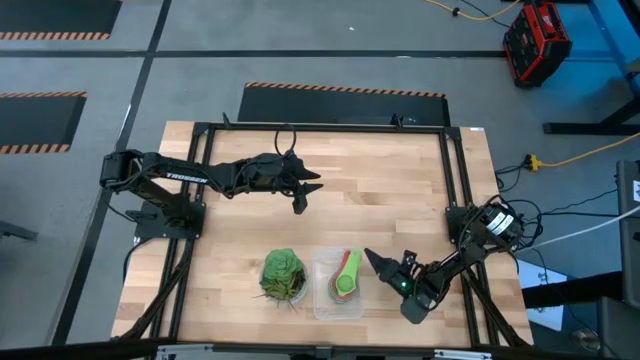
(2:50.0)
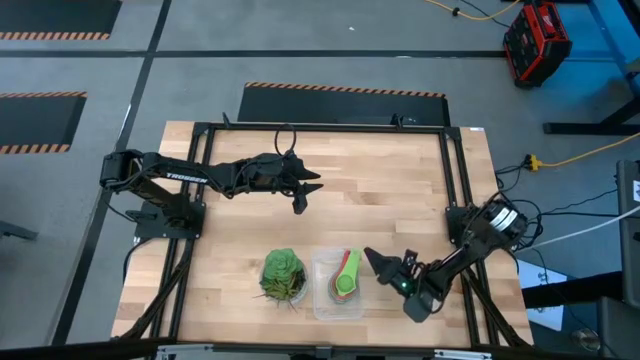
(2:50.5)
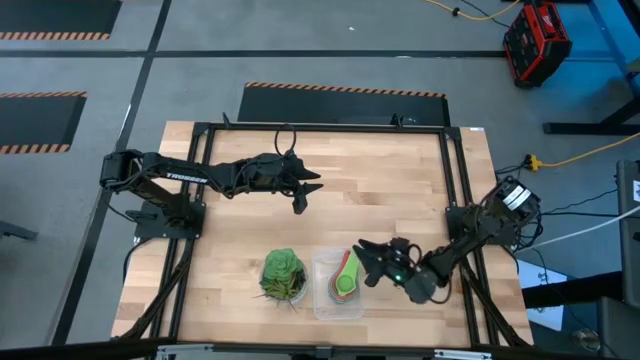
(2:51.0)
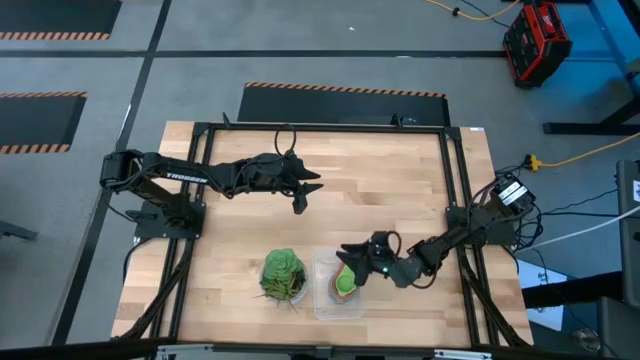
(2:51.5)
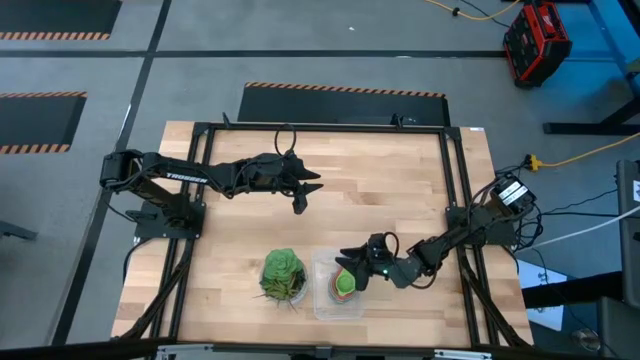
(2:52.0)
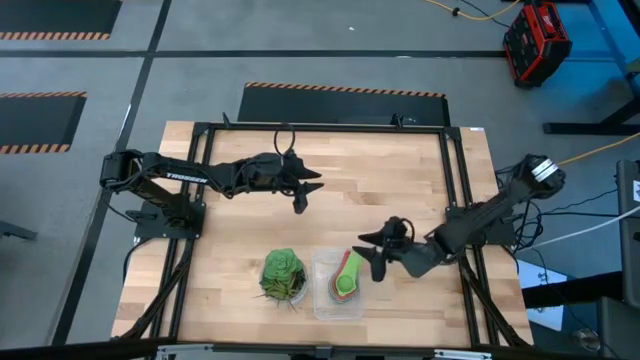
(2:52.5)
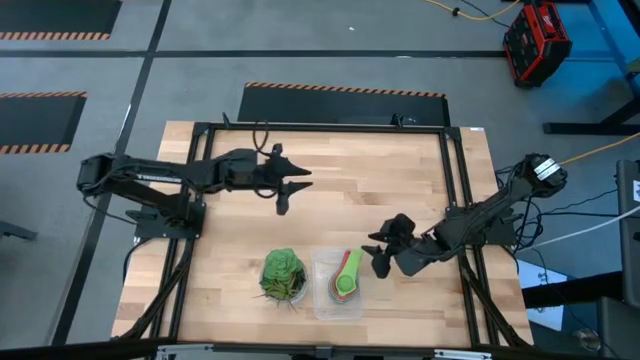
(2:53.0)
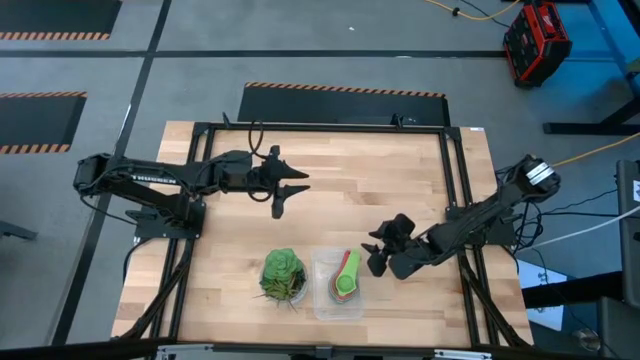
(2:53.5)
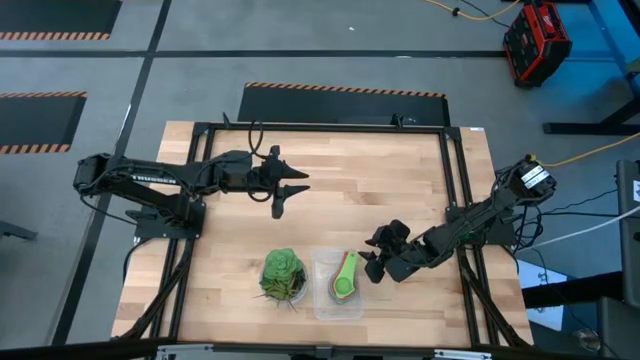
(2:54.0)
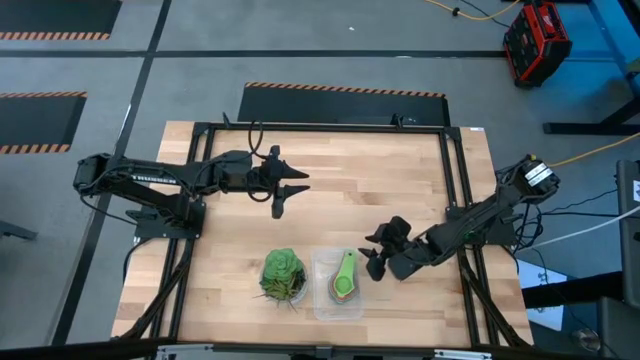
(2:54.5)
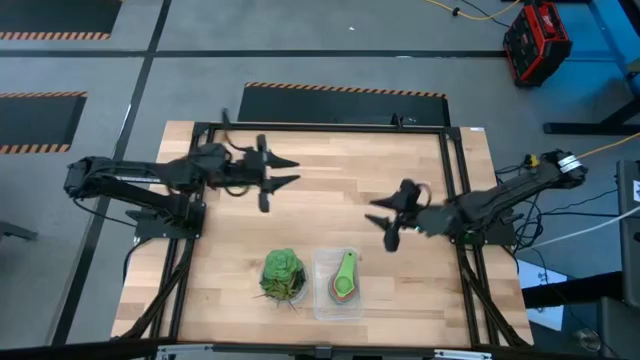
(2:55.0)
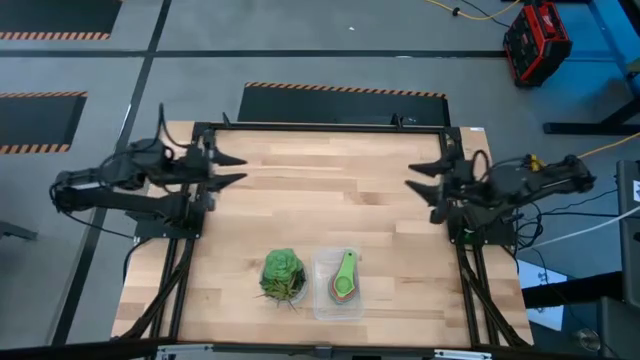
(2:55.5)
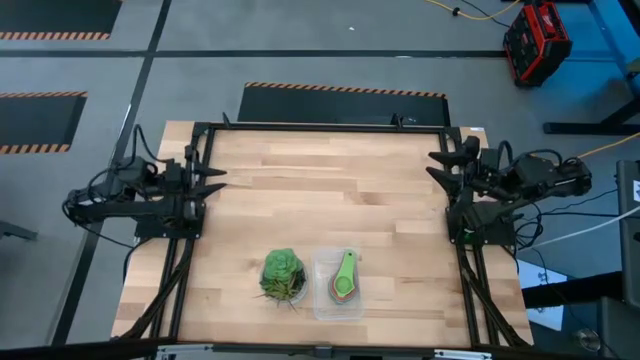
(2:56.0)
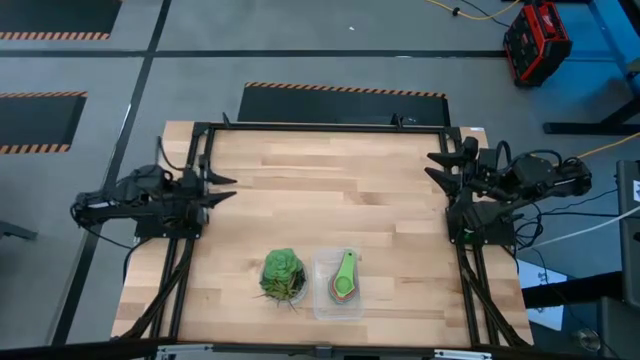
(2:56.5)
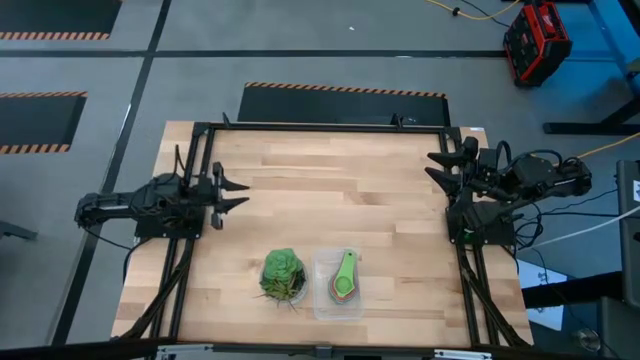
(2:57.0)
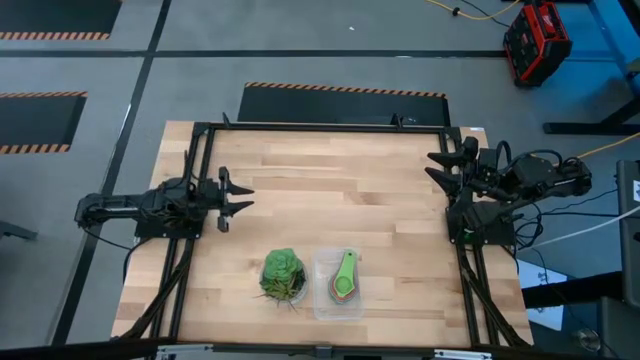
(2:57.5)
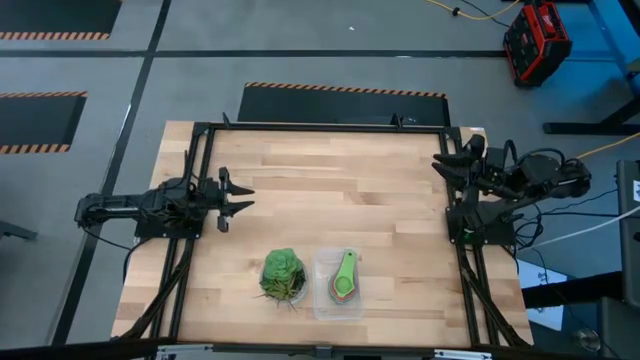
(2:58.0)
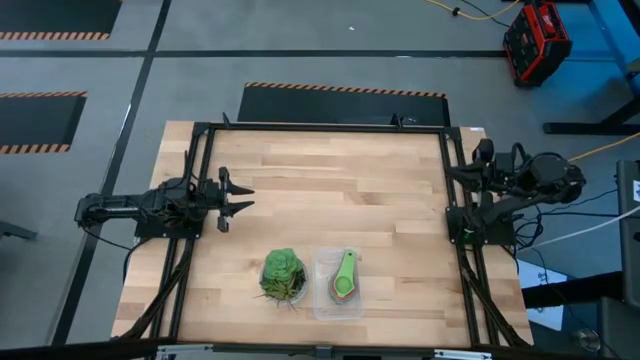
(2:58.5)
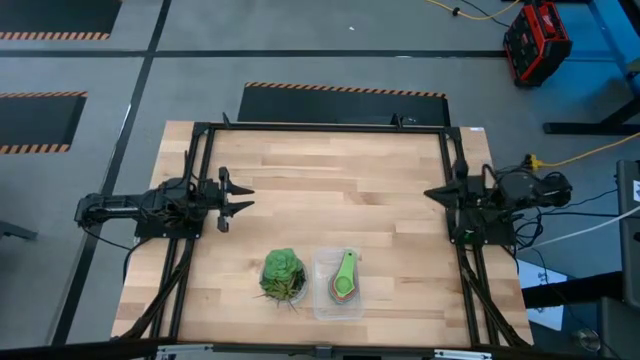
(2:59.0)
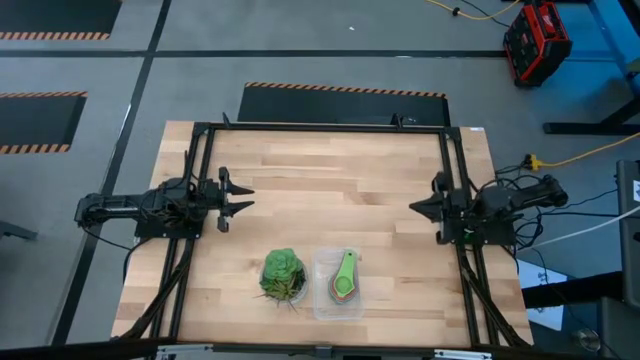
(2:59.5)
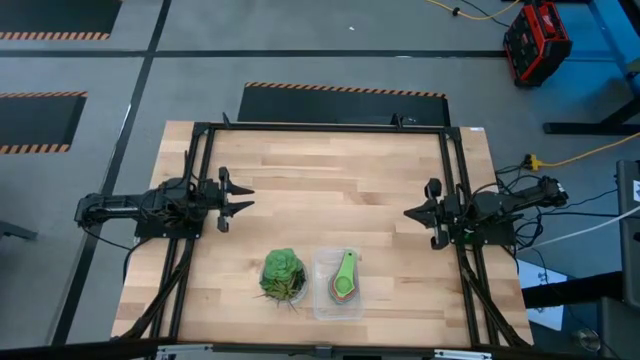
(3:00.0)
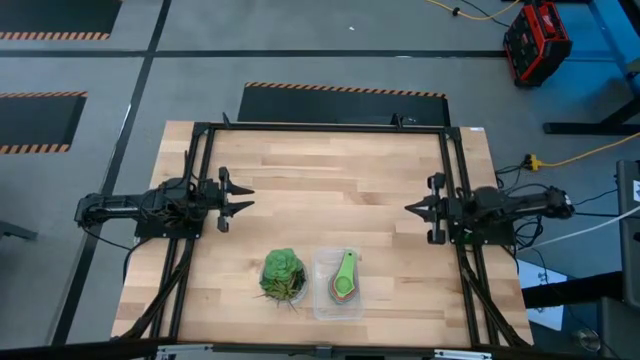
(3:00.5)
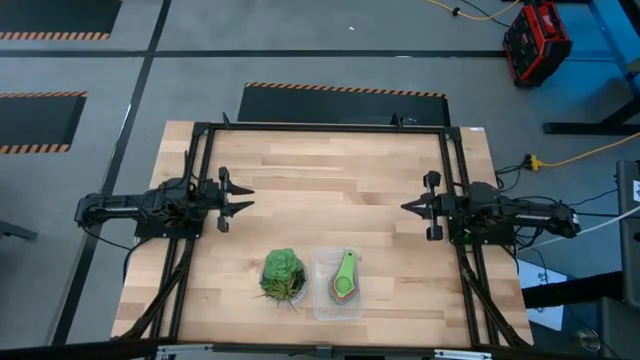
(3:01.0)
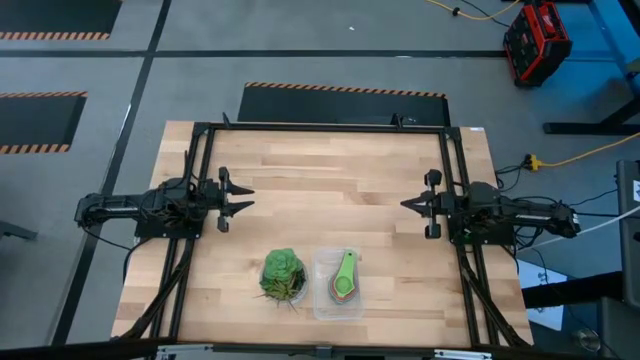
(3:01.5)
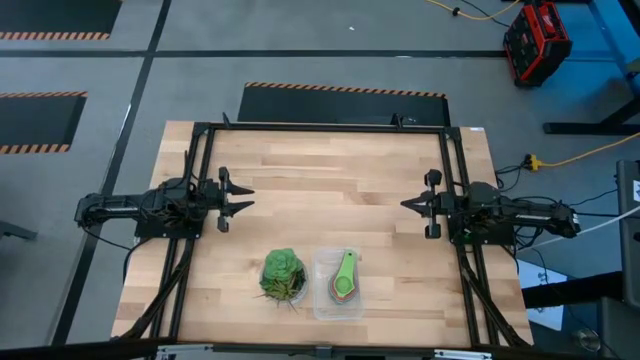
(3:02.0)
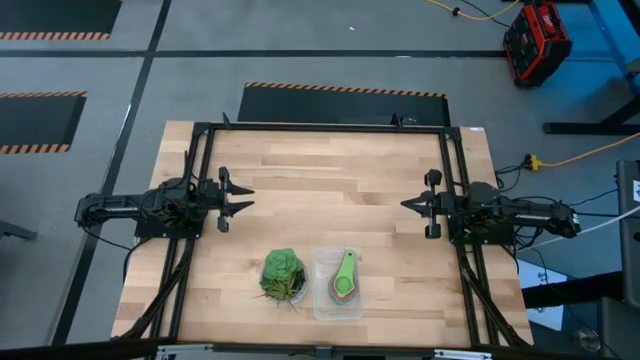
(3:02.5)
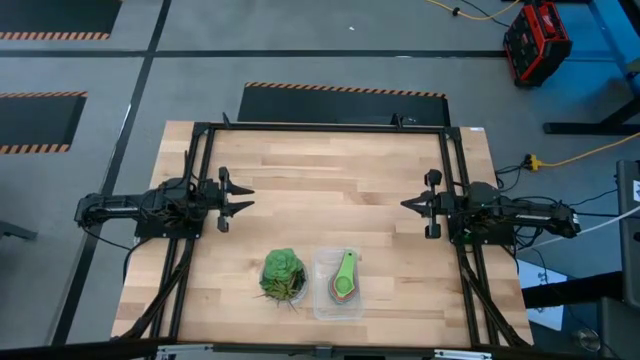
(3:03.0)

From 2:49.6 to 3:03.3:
Task: Nest measuring cups in basket
Return to Home Position
